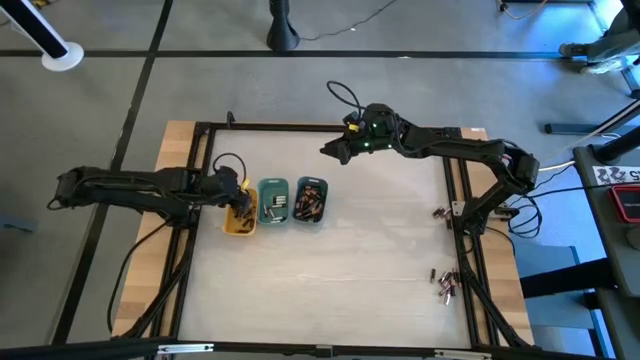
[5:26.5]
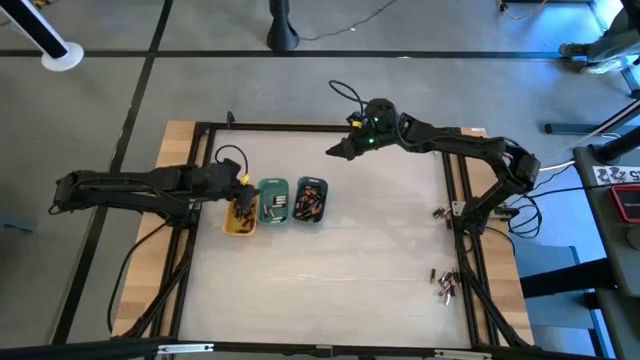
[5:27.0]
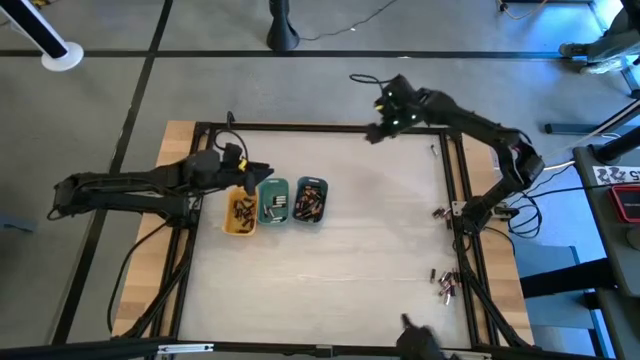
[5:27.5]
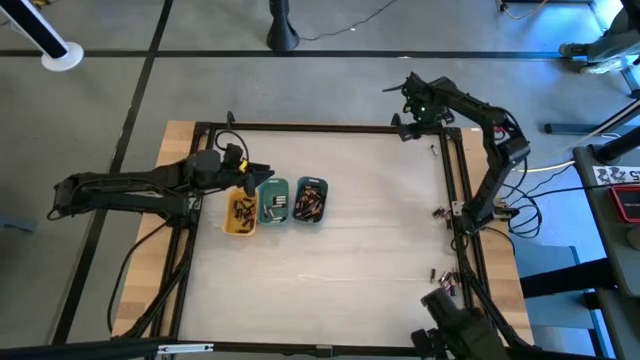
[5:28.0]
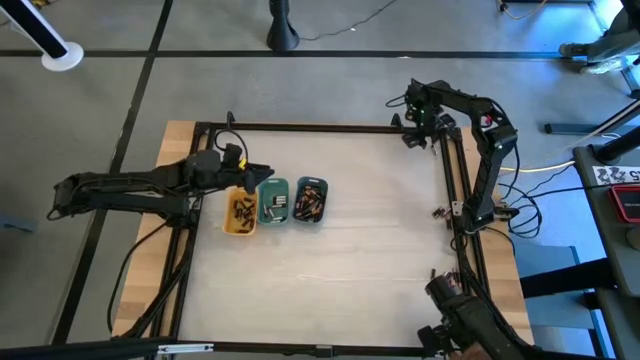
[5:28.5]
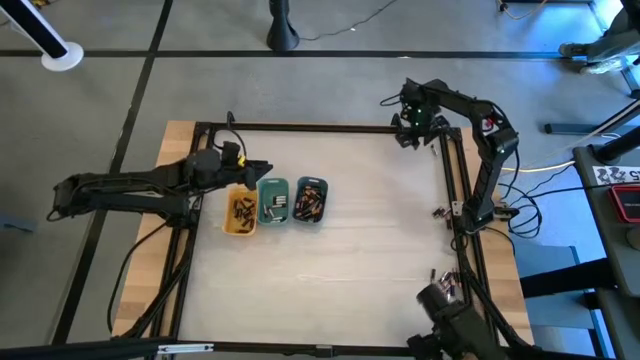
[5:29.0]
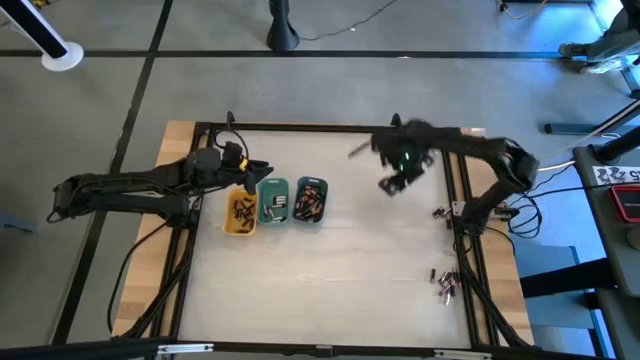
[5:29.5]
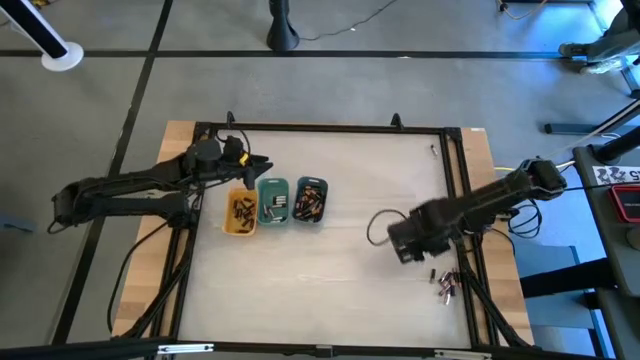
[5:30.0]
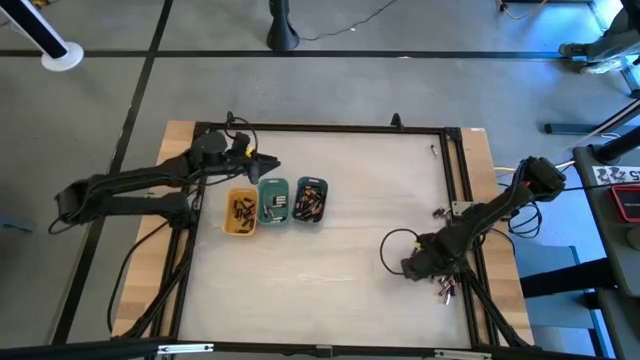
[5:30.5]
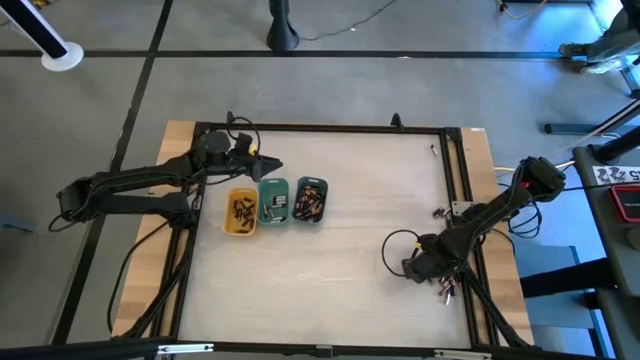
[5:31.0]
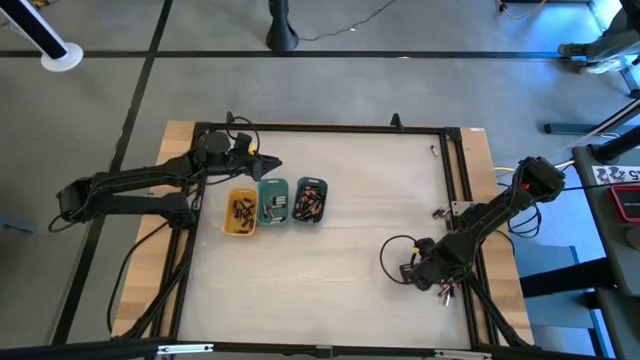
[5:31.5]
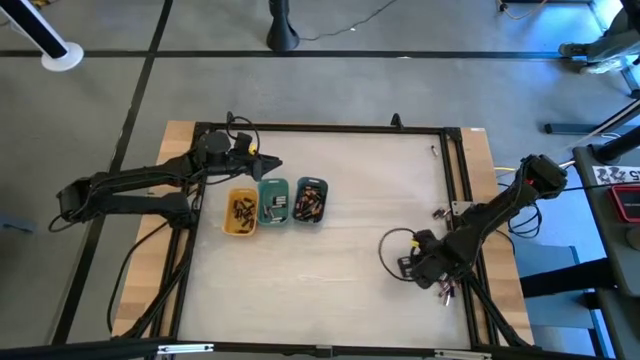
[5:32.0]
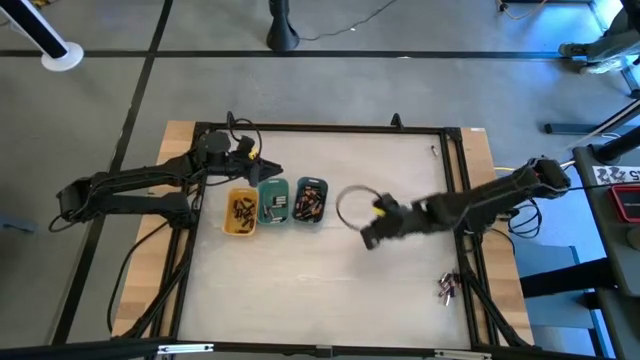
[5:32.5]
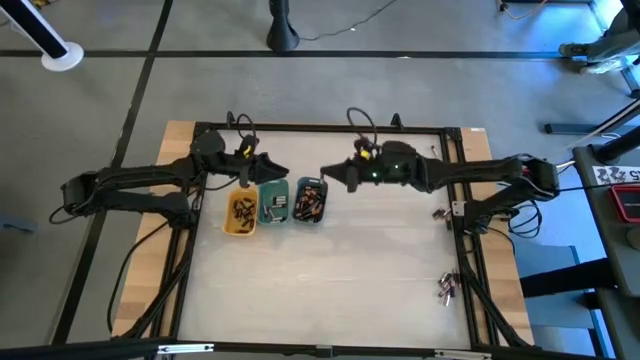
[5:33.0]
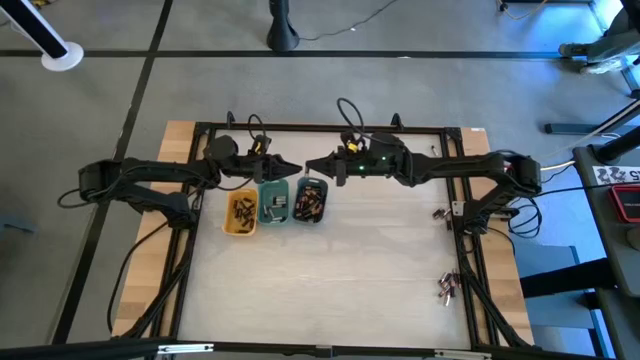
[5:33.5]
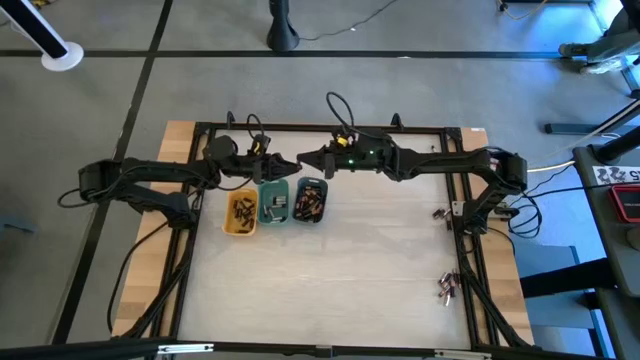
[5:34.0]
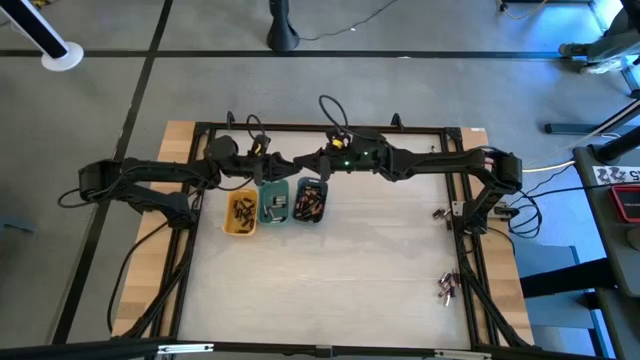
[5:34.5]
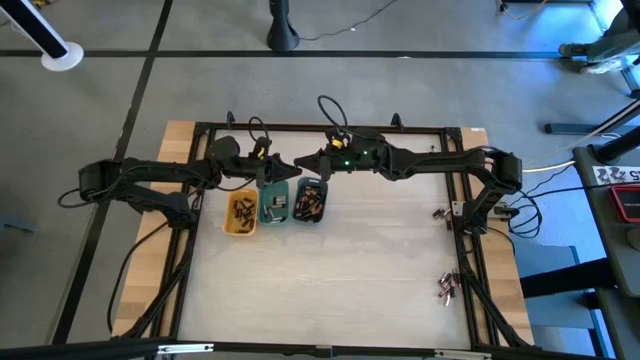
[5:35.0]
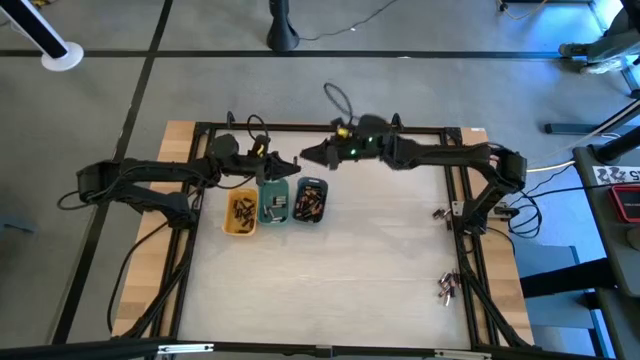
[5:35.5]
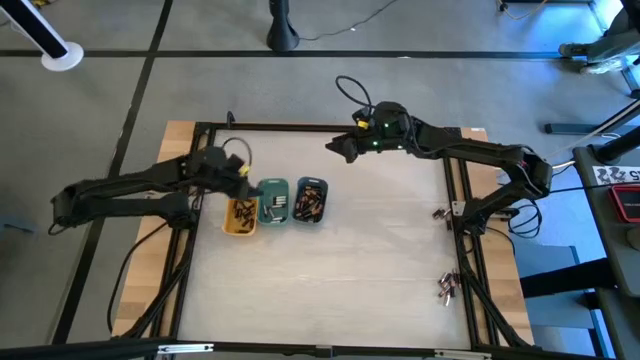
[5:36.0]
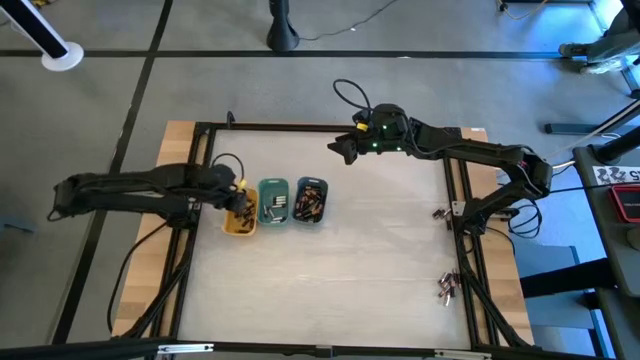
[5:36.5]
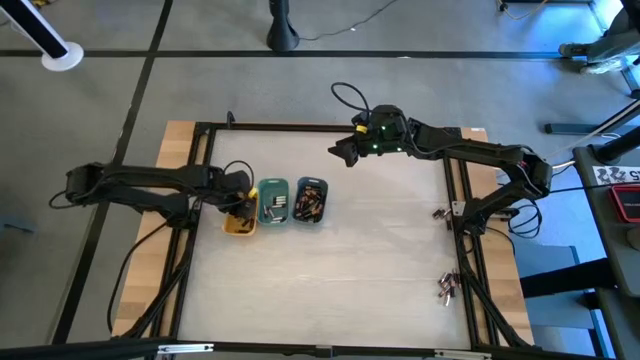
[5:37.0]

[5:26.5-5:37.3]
Task: Sort batteries
Put the small black battery into the yellow bin

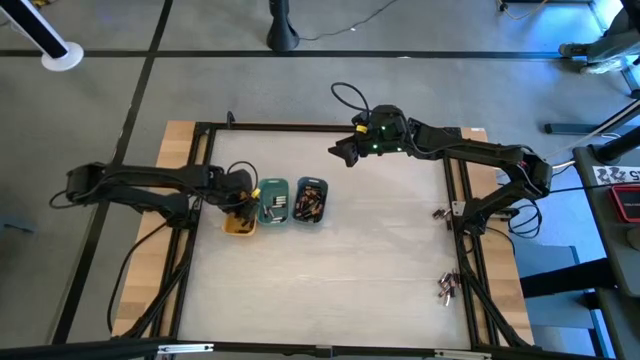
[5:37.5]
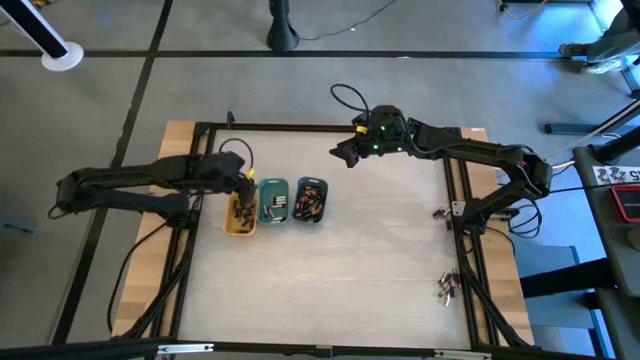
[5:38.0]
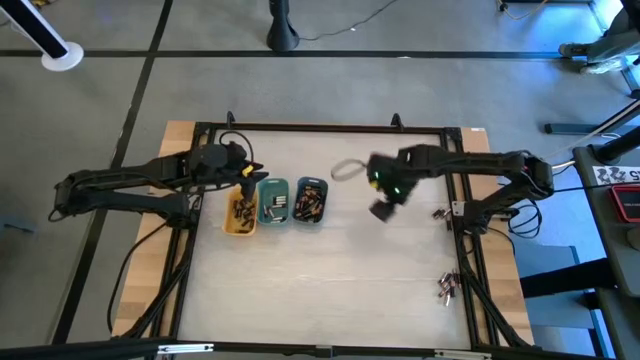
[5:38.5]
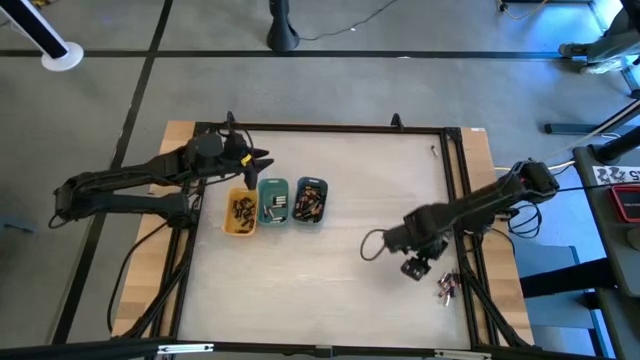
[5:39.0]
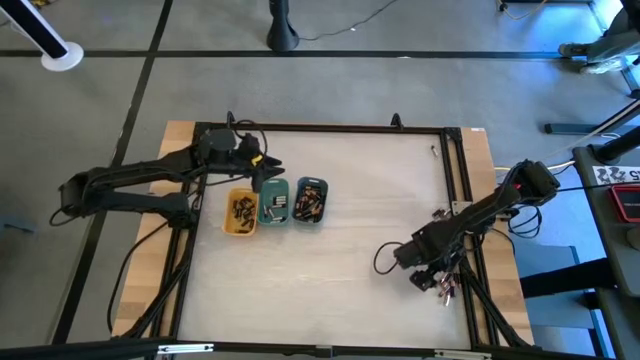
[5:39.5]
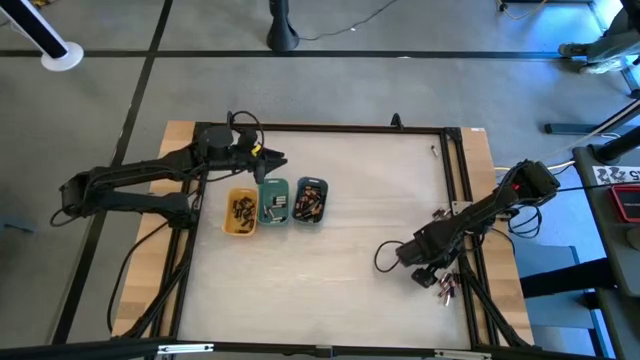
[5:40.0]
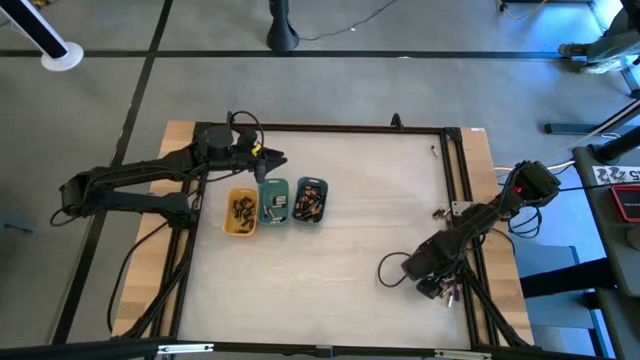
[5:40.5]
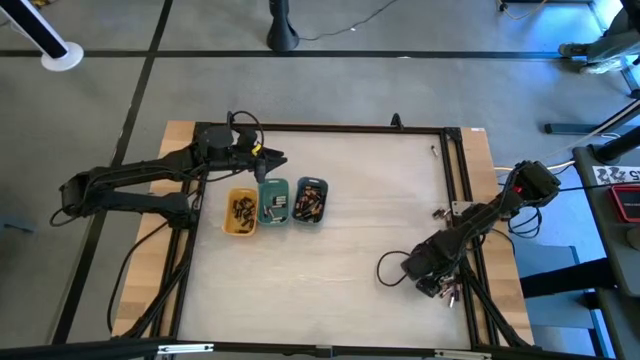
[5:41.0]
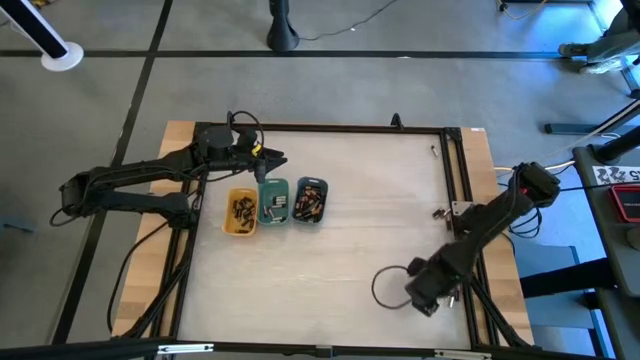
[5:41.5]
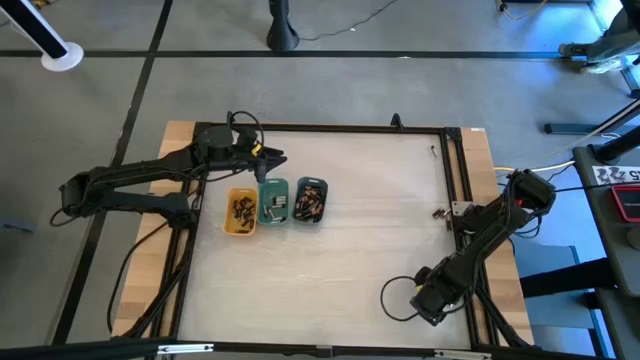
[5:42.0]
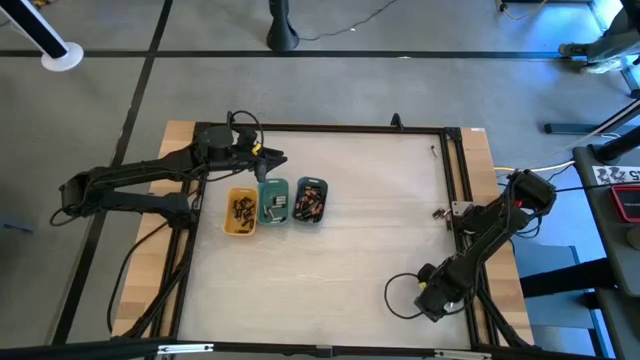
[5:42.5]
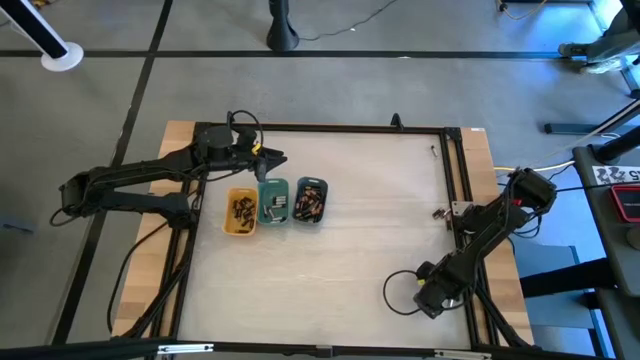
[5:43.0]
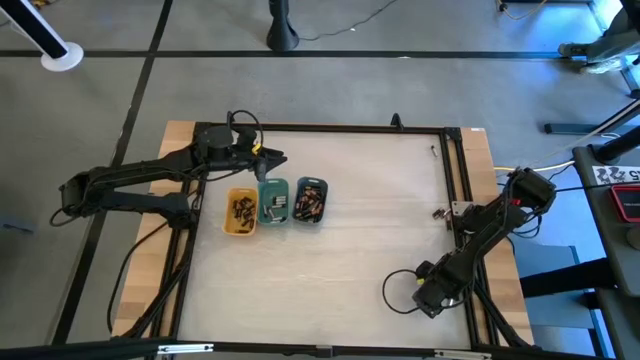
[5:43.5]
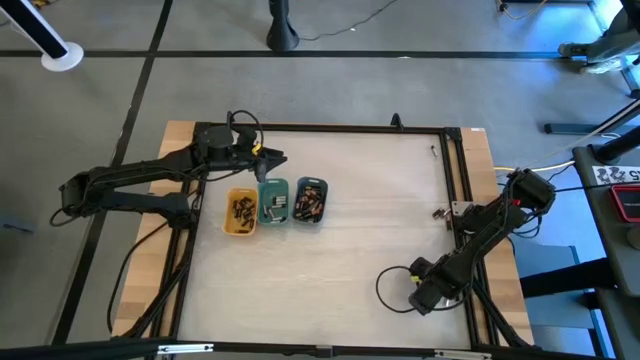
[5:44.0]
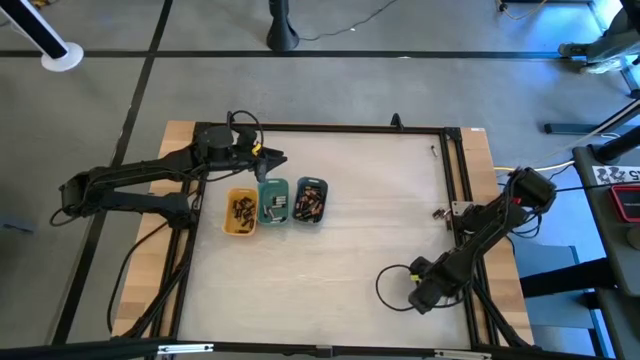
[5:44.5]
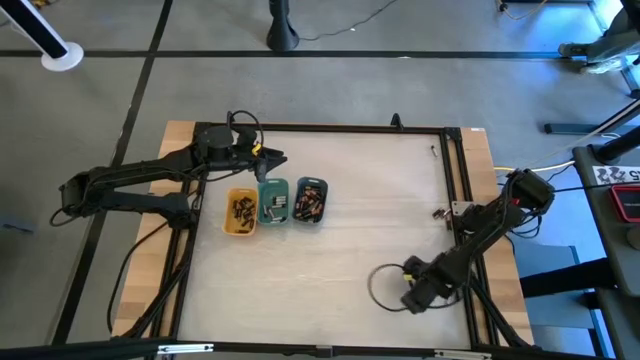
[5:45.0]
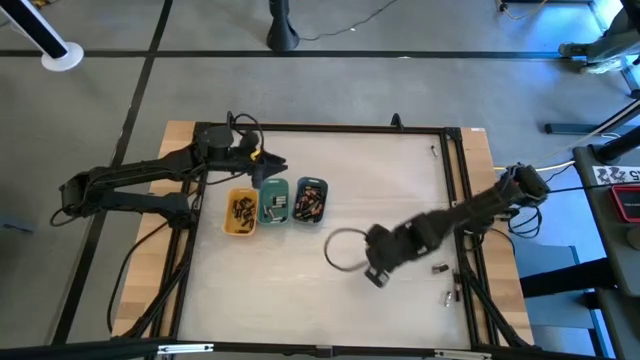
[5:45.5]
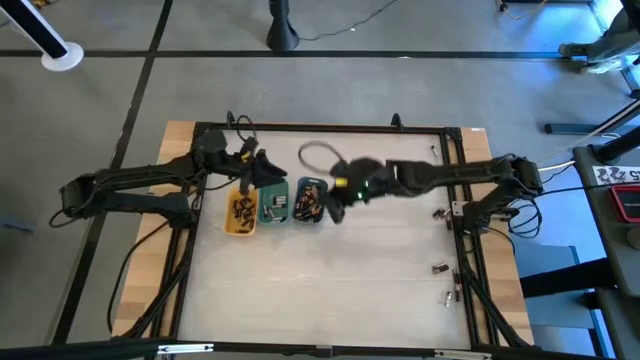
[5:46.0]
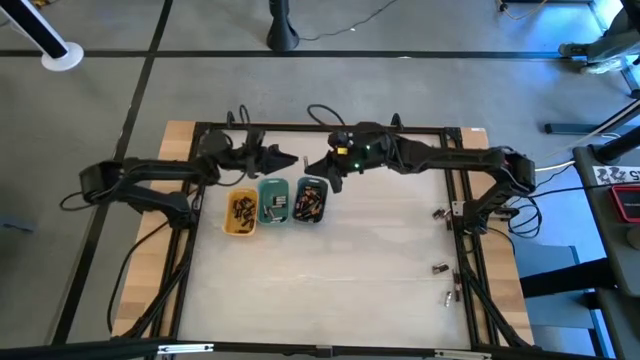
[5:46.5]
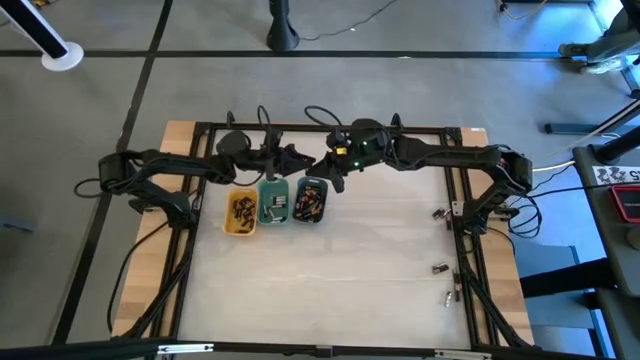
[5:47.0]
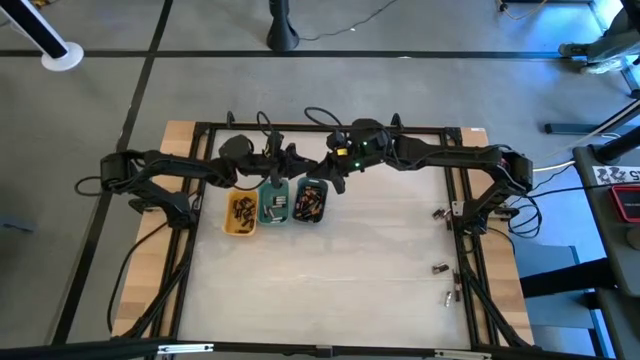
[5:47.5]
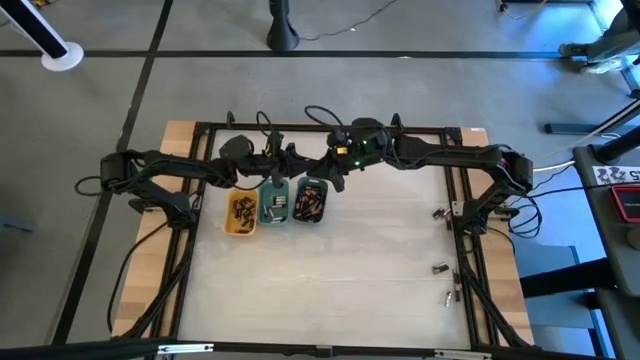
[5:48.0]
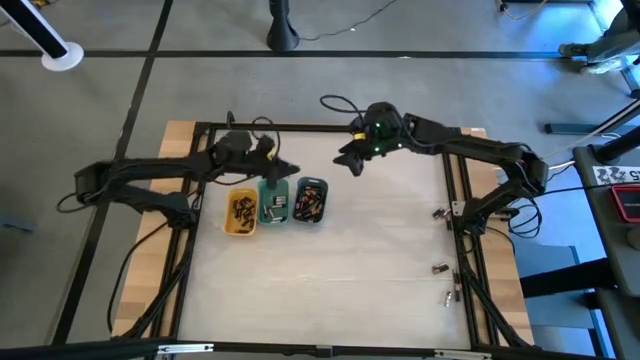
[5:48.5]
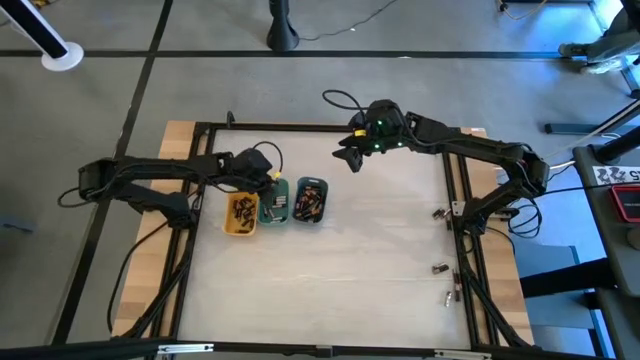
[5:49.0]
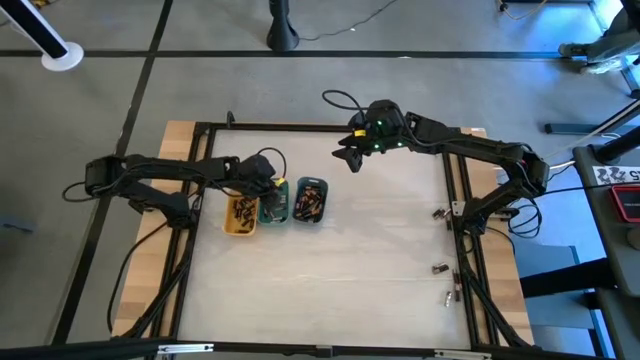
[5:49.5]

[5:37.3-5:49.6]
Put the silver battery into the green bin
